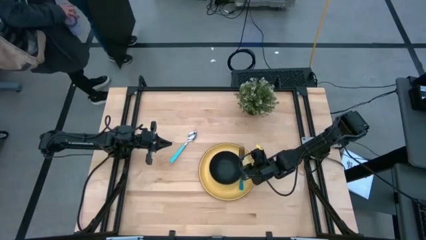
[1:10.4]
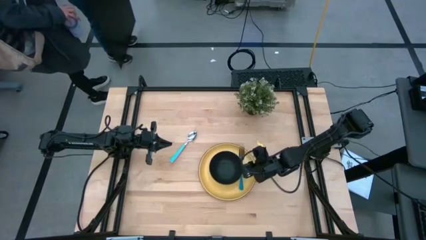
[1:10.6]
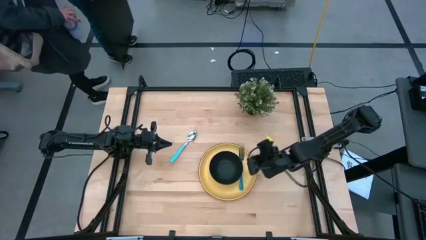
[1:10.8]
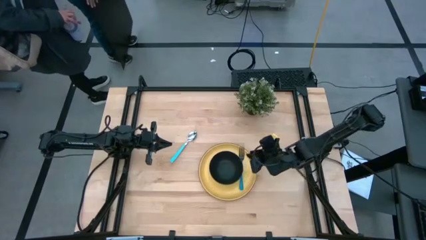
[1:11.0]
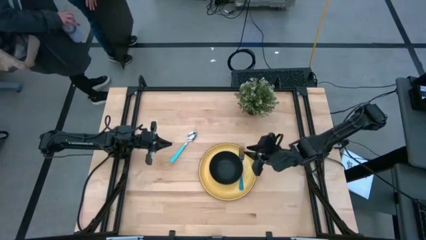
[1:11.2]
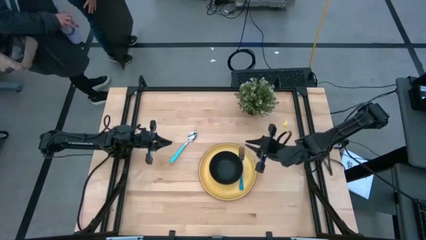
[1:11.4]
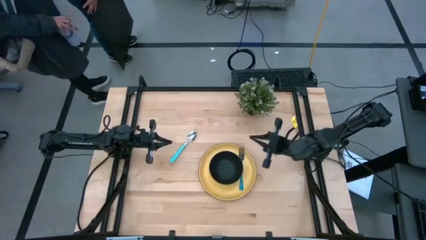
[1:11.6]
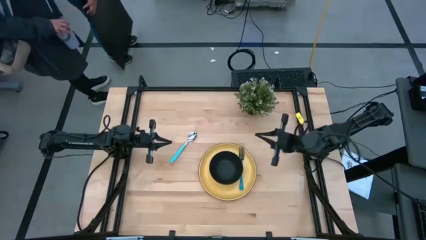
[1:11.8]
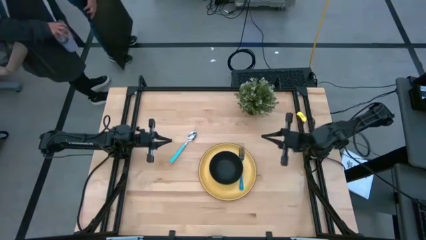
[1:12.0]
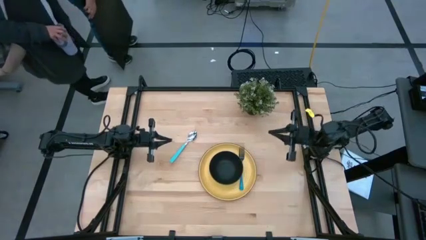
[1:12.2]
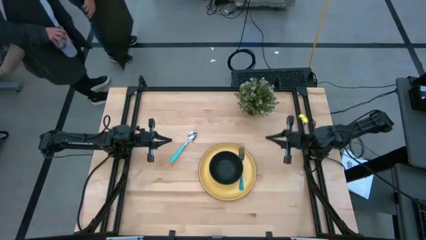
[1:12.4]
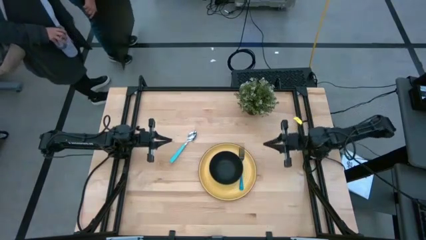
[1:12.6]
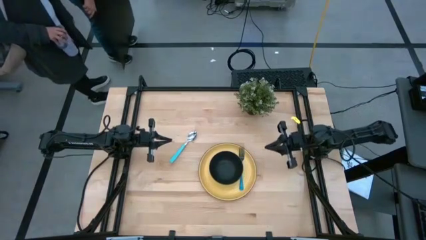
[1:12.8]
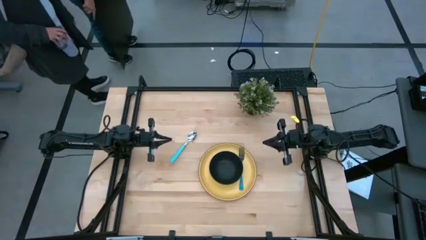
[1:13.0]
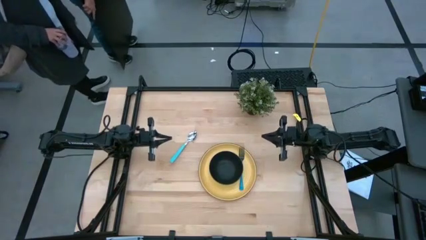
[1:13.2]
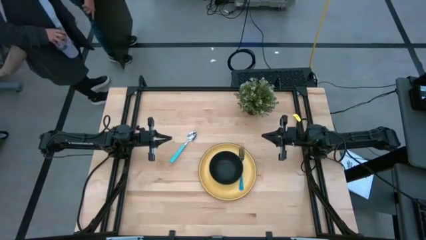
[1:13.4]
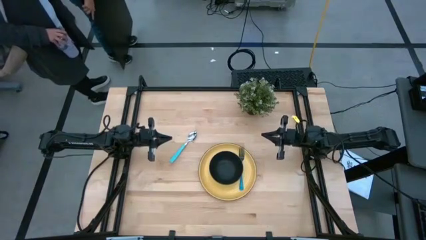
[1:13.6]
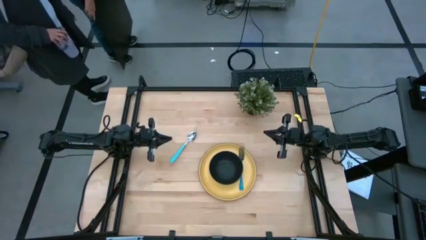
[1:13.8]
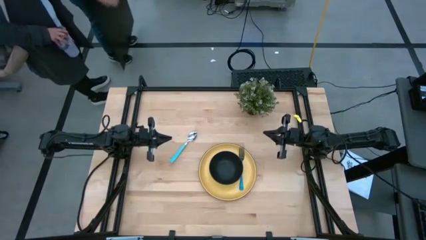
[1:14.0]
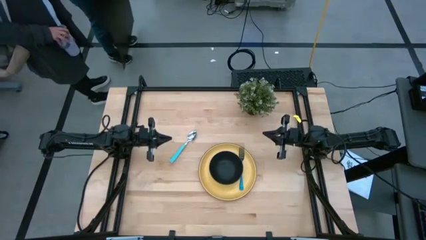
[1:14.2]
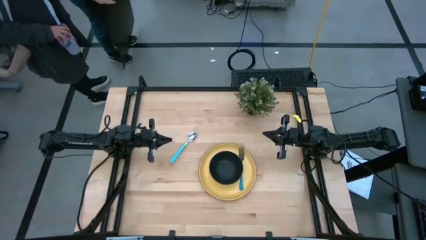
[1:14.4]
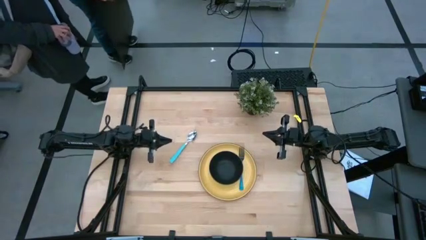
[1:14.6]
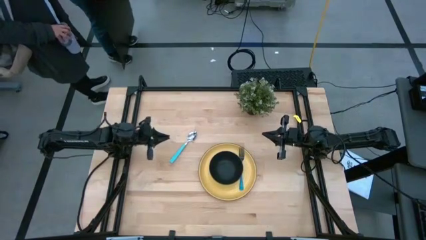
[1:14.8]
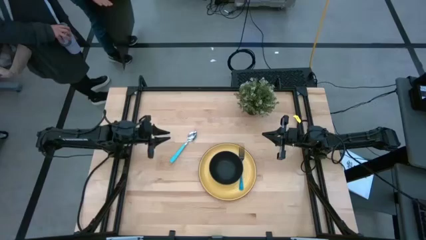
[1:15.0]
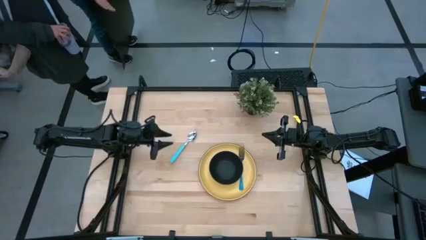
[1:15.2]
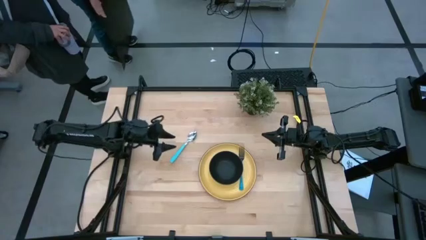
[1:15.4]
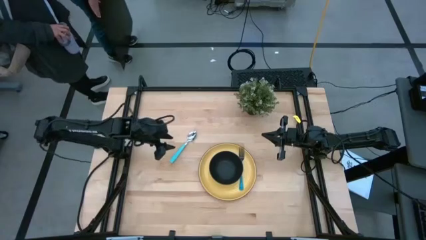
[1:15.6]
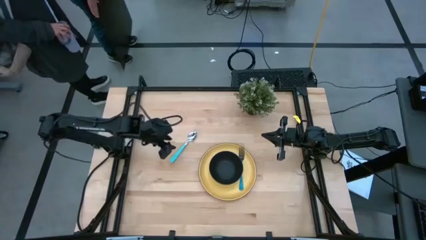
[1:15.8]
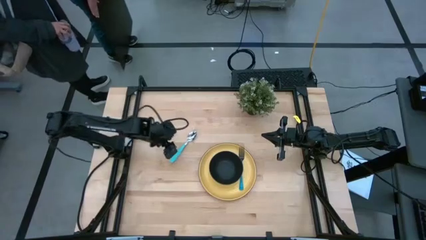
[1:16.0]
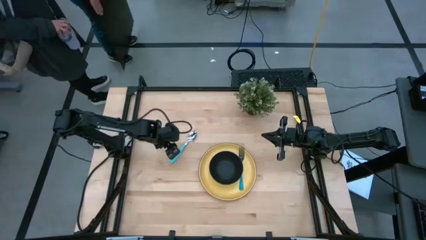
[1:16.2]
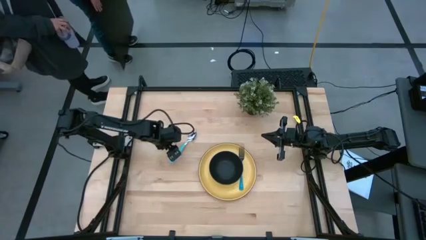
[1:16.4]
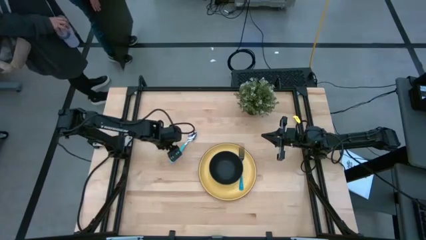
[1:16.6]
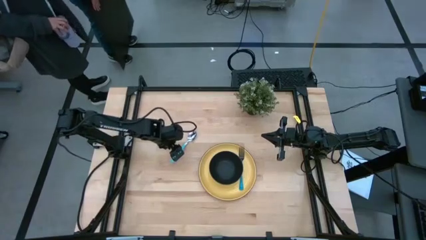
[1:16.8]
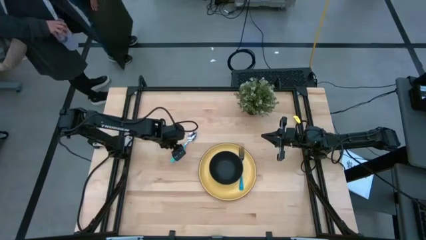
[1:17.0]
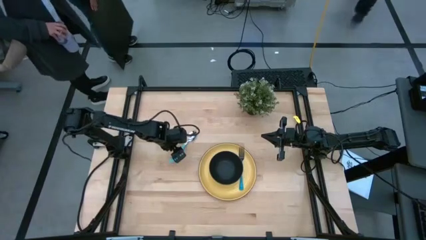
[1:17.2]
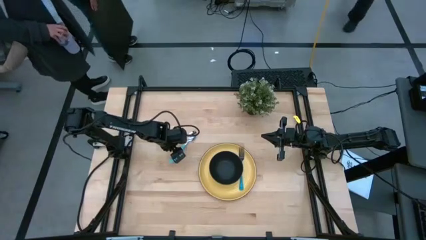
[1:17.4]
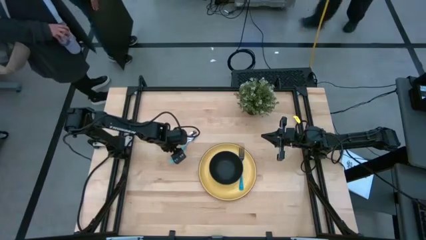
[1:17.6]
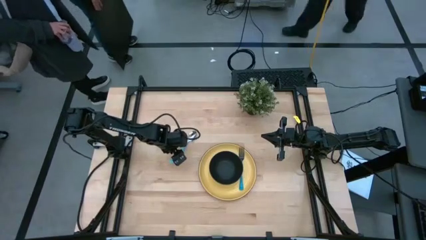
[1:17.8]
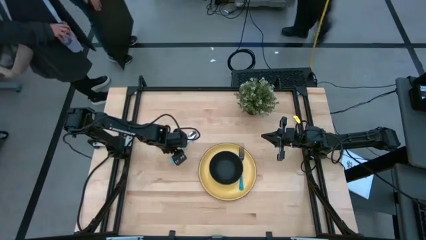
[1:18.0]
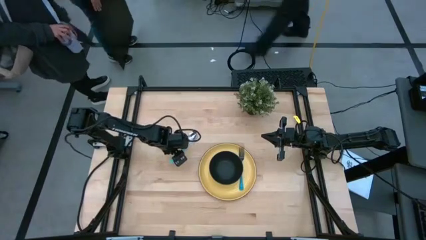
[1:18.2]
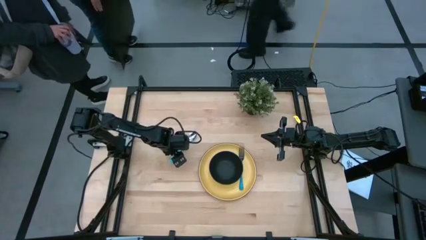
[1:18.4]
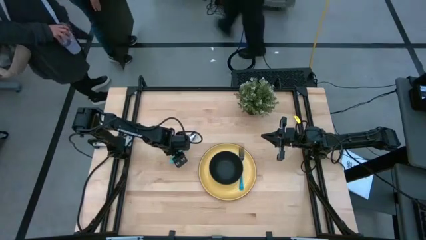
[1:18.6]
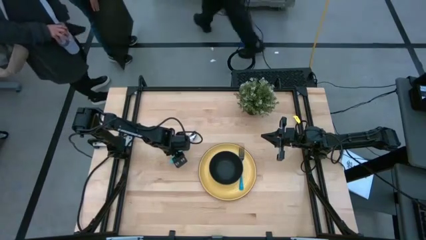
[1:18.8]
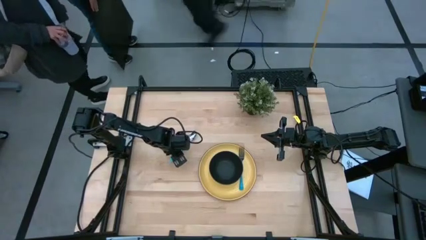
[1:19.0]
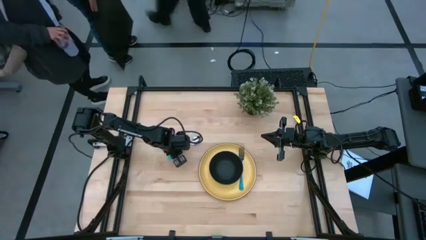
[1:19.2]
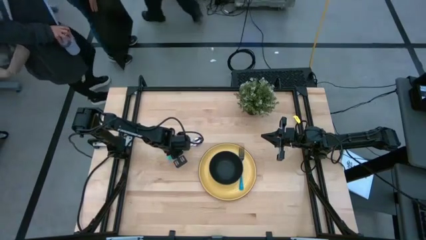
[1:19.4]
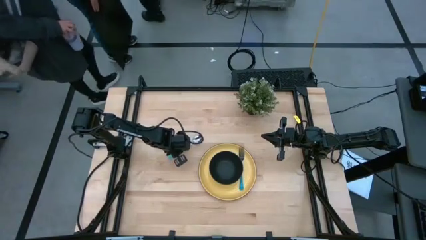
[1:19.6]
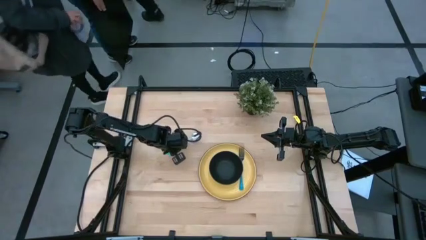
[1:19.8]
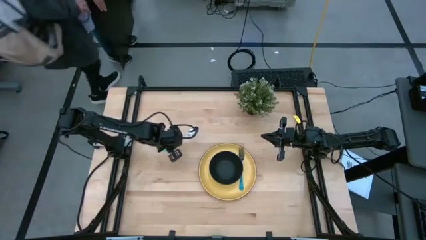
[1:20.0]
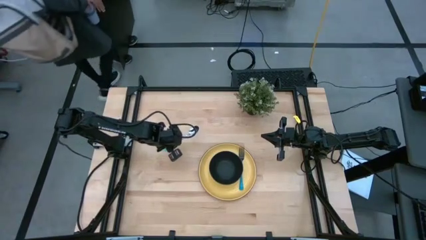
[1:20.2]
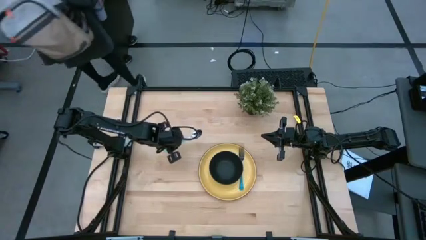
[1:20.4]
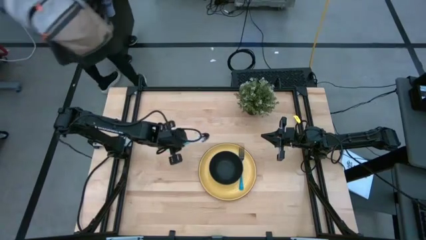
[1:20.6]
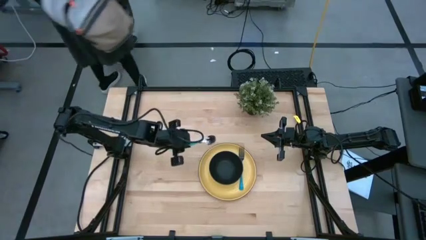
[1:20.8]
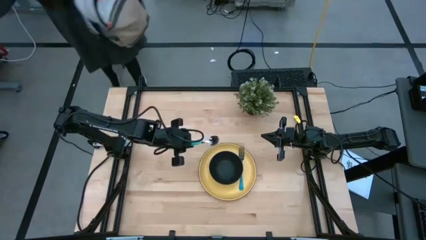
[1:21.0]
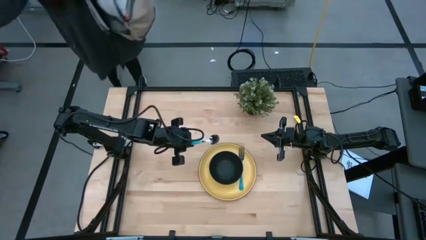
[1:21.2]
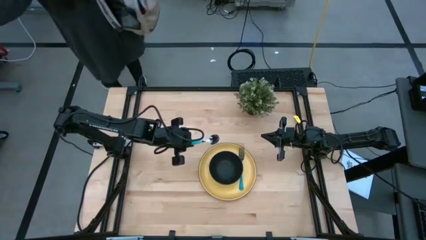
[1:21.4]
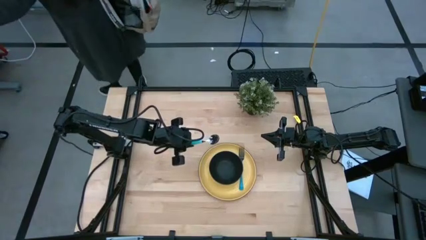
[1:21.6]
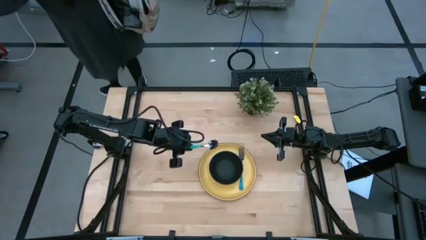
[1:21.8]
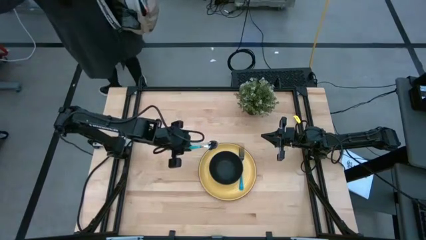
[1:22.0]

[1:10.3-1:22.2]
Task: Set table place
Put the blue spoon into the black bowl
